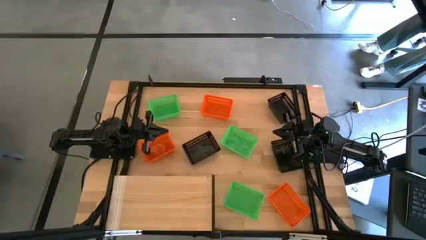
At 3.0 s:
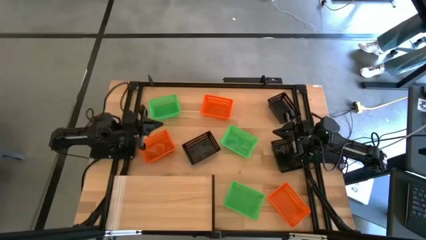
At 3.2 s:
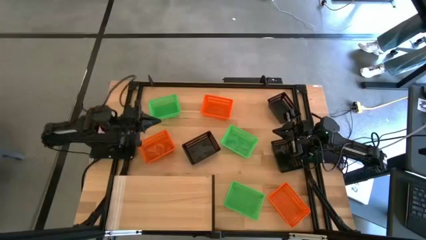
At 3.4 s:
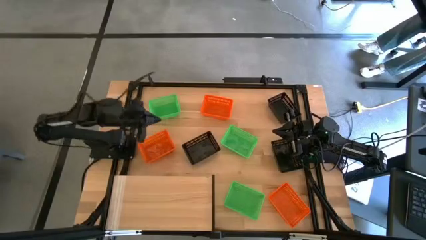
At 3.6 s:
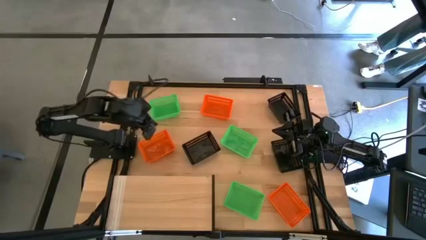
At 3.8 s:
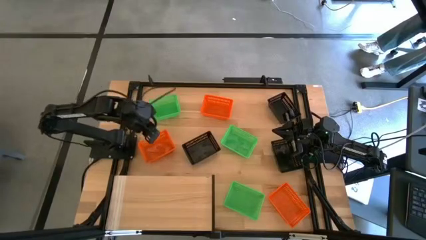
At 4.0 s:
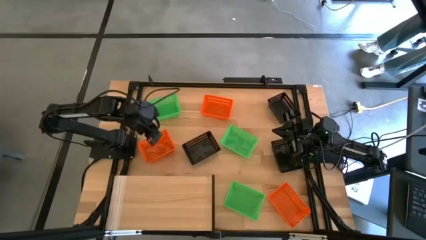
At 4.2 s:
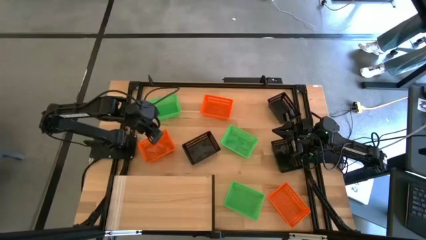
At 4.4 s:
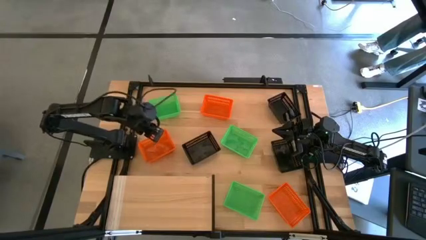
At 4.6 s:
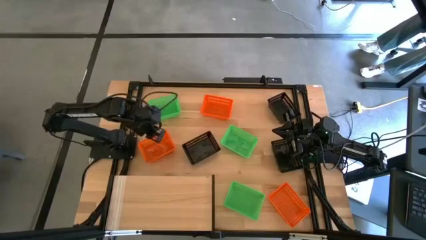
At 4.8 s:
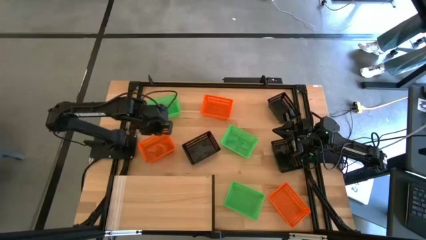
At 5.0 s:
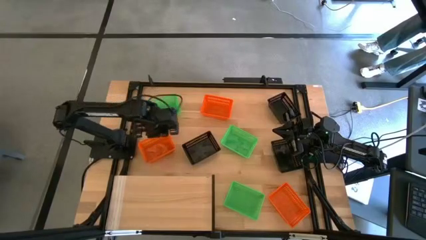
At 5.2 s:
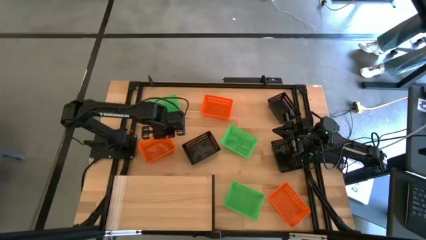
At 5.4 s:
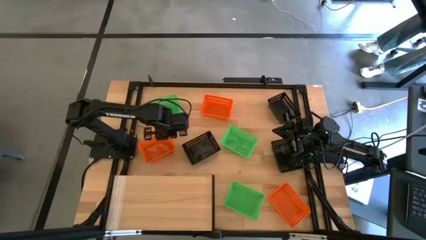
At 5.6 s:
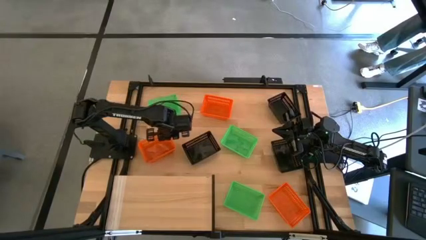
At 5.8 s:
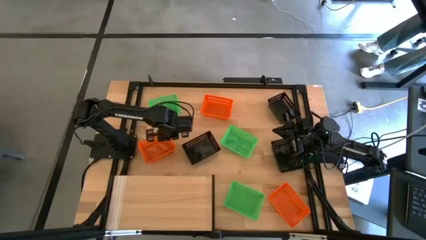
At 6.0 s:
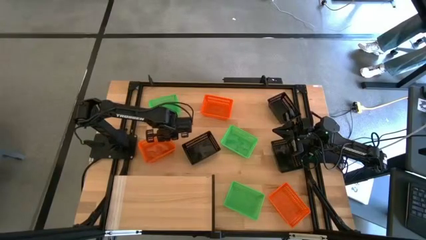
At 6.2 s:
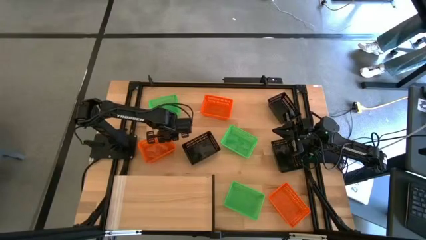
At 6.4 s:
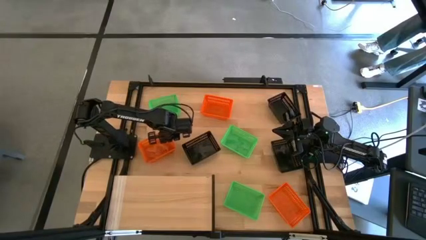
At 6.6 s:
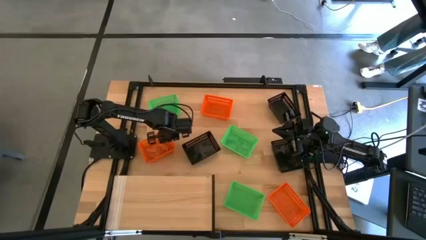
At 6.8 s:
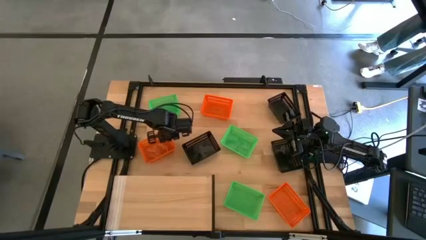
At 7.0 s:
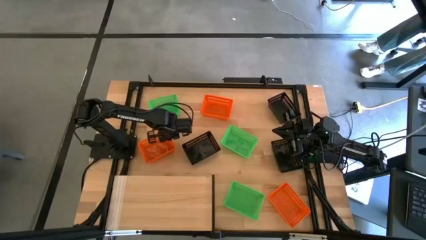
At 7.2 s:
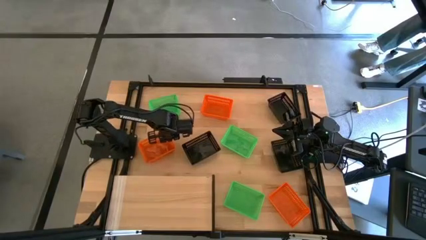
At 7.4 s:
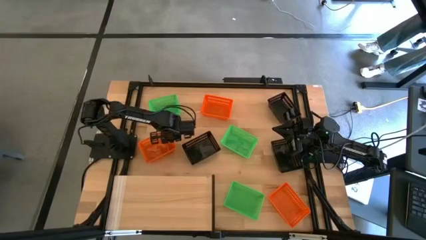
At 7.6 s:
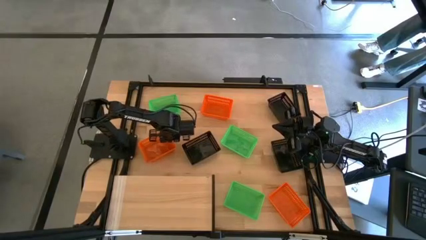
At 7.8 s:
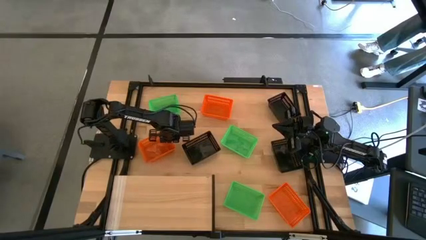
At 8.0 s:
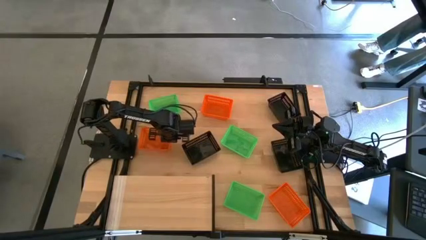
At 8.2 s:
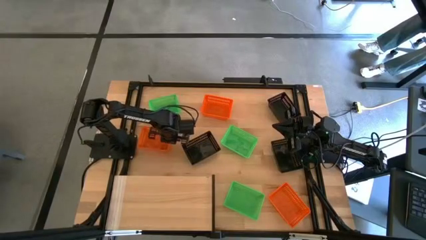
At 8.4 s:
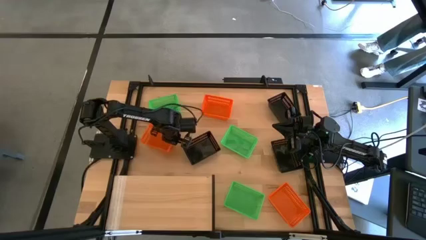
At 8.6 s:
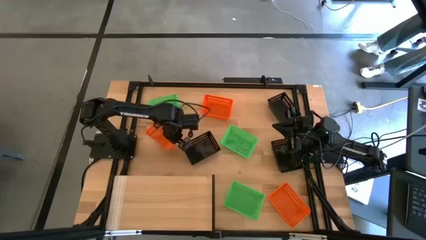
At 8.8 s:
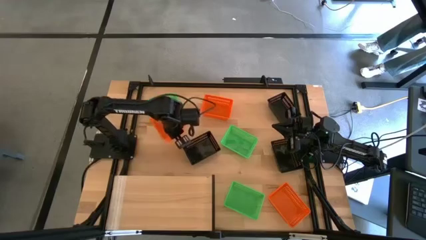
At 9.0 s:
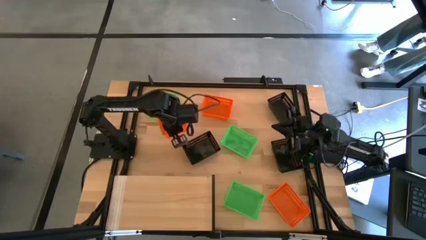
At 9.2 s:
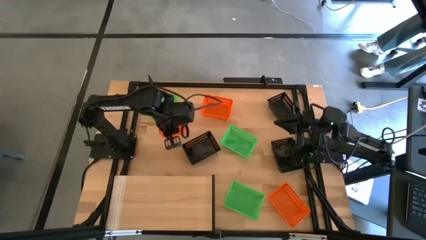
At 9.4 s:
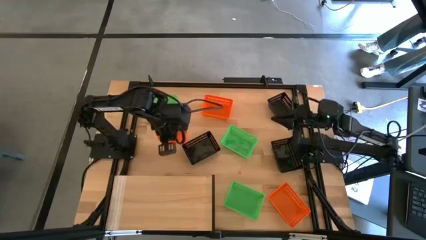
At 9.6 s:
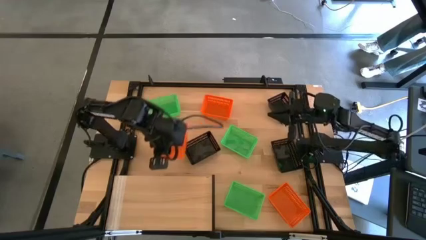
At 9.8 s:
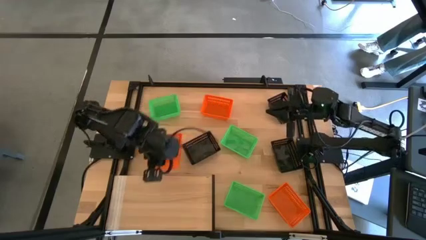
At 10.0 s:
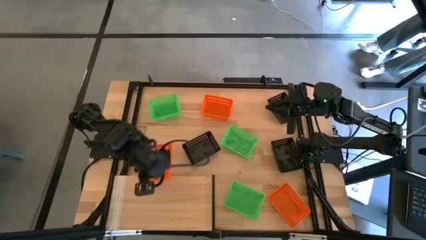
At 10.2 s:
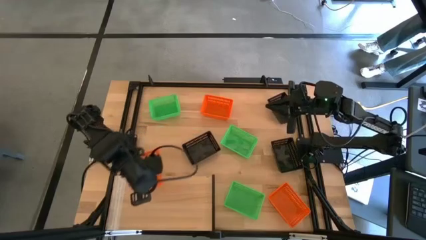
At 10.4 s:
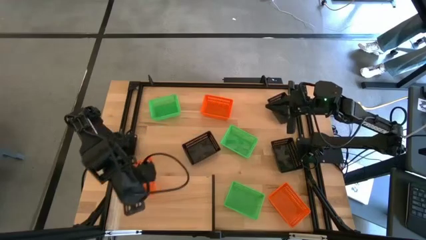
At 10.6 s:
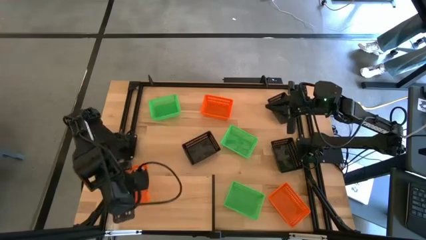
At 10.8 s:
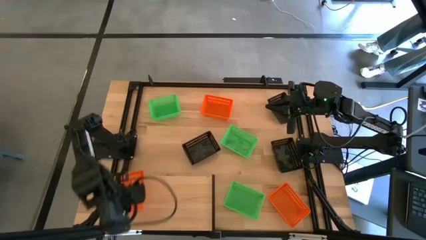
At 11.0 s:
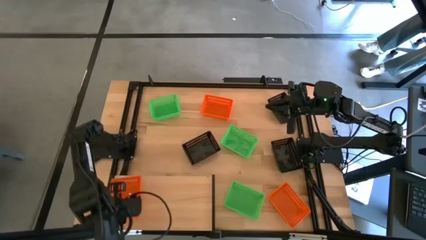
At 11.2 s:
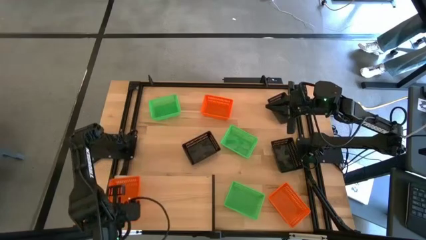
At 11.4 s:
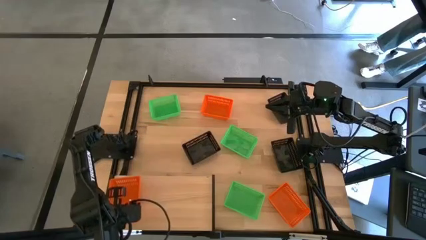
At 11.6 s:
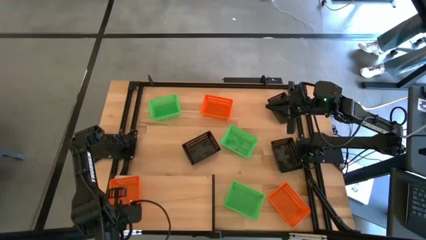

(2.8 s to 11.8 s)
Task: Stack baskets on shelf by color
Put the middle orange basket on the shelf

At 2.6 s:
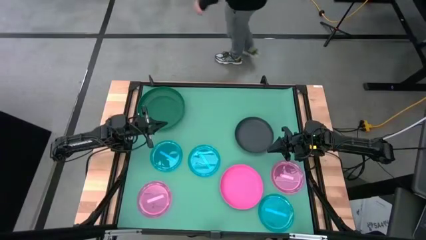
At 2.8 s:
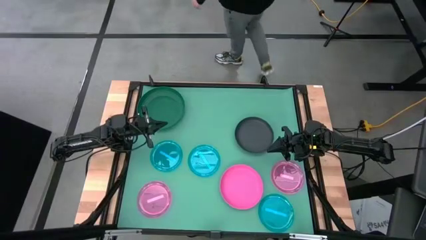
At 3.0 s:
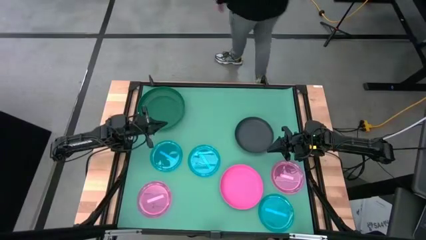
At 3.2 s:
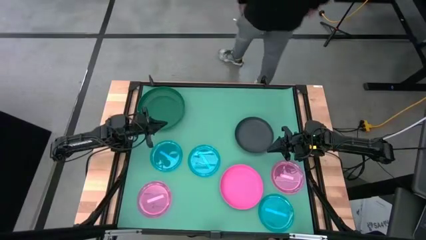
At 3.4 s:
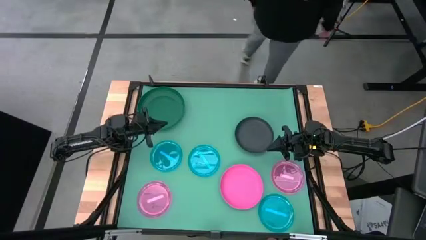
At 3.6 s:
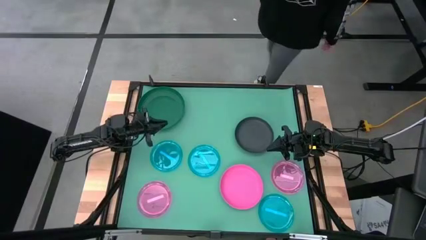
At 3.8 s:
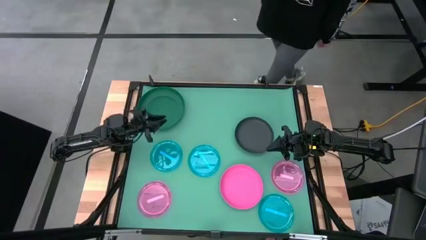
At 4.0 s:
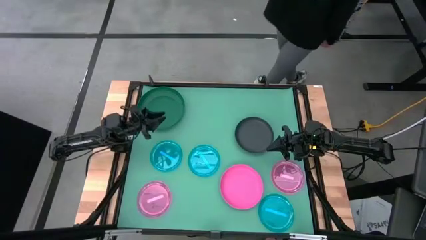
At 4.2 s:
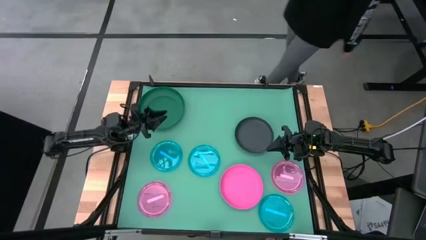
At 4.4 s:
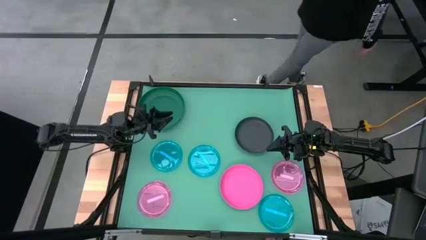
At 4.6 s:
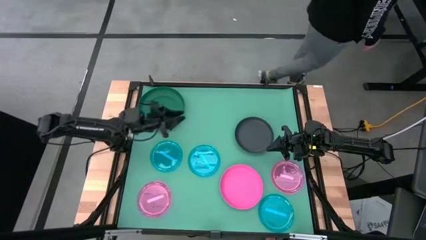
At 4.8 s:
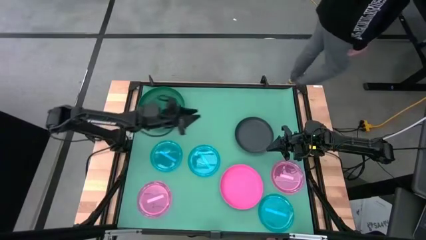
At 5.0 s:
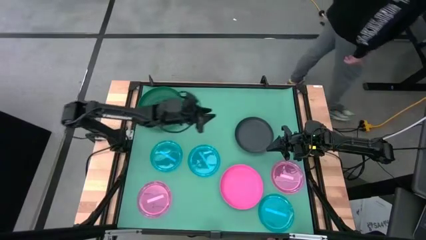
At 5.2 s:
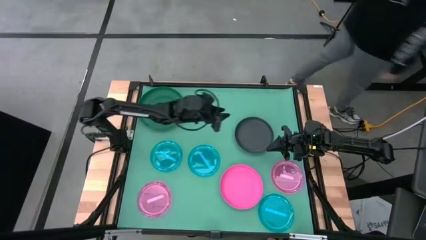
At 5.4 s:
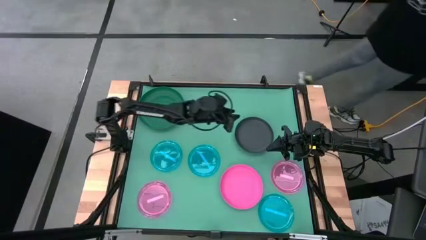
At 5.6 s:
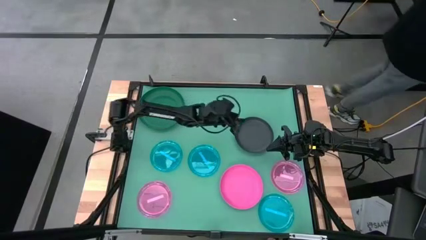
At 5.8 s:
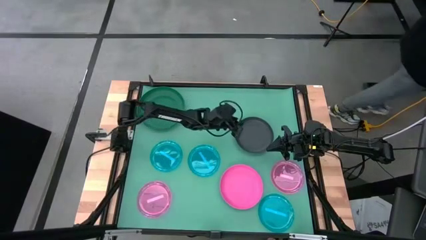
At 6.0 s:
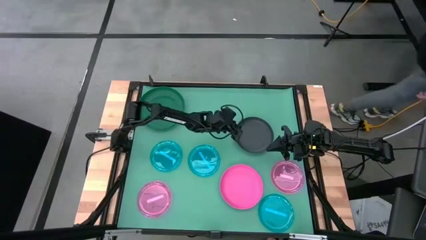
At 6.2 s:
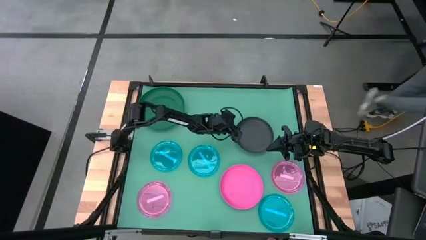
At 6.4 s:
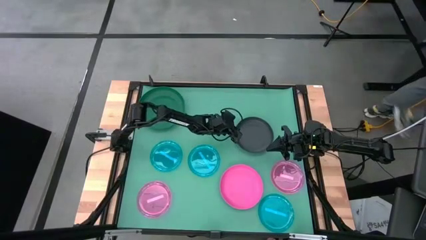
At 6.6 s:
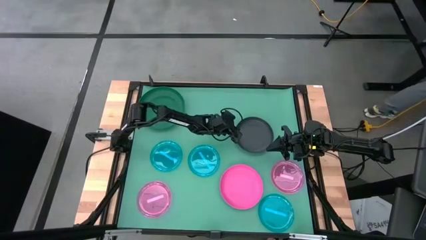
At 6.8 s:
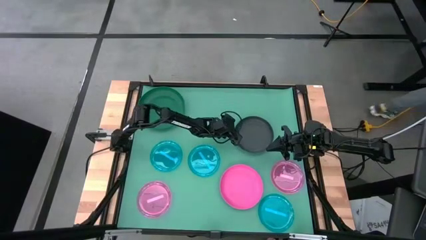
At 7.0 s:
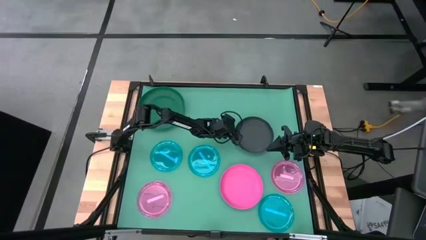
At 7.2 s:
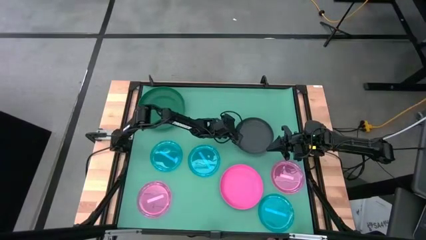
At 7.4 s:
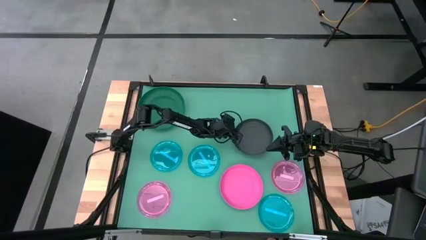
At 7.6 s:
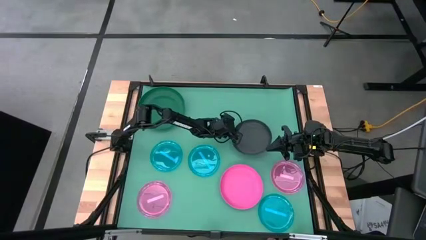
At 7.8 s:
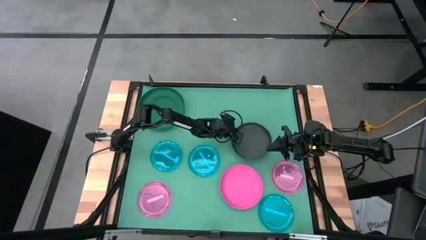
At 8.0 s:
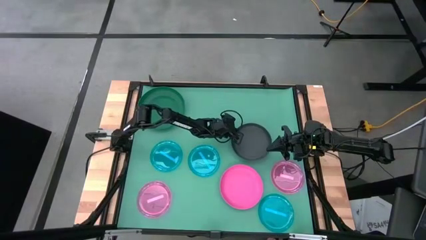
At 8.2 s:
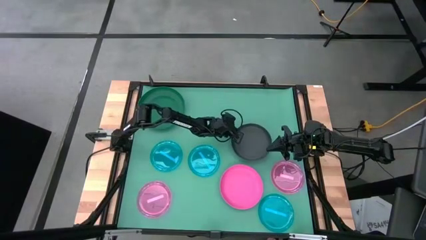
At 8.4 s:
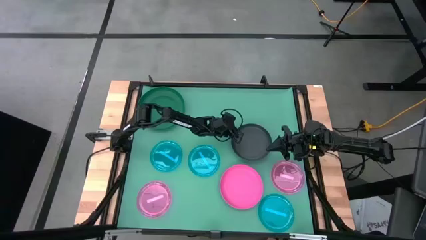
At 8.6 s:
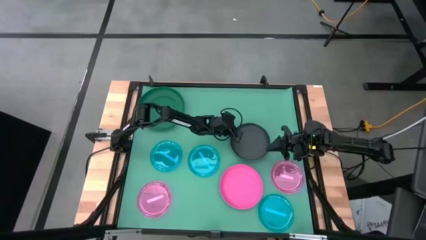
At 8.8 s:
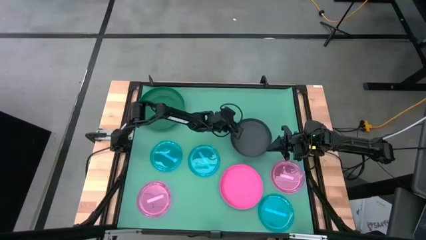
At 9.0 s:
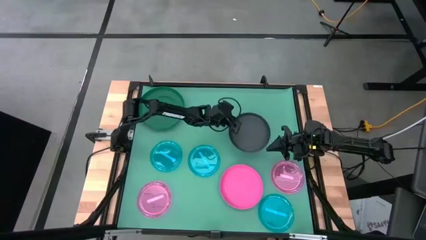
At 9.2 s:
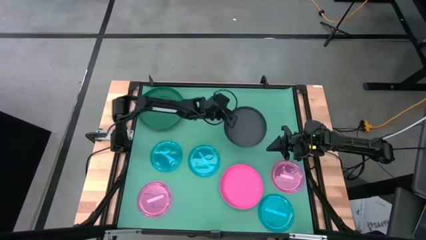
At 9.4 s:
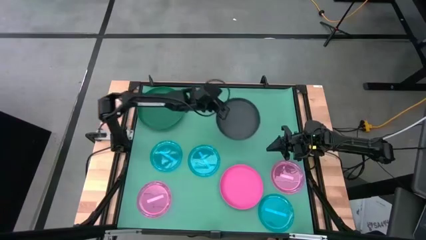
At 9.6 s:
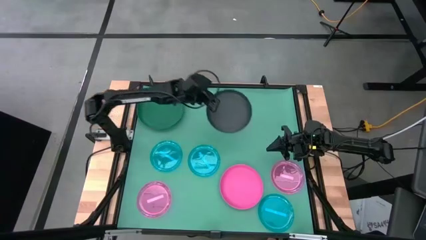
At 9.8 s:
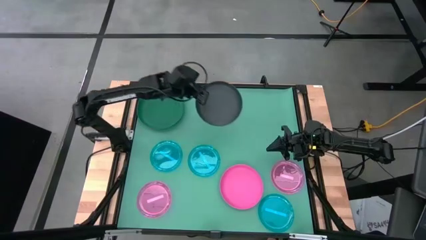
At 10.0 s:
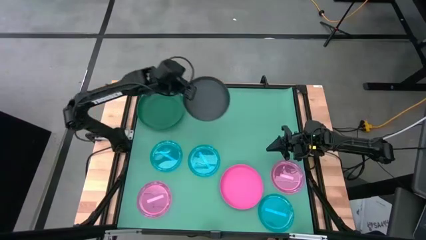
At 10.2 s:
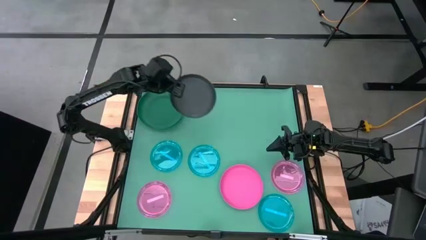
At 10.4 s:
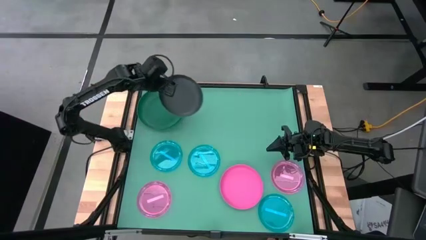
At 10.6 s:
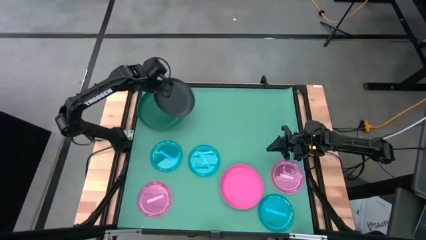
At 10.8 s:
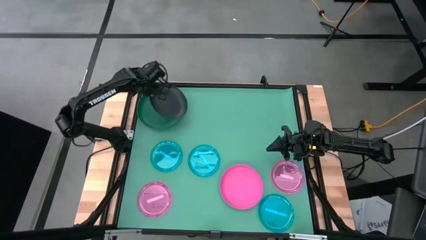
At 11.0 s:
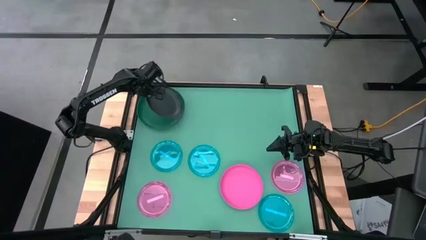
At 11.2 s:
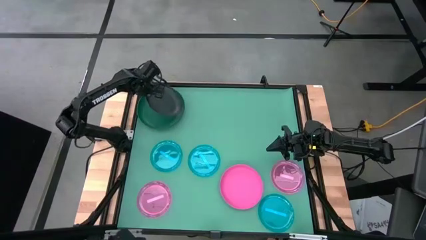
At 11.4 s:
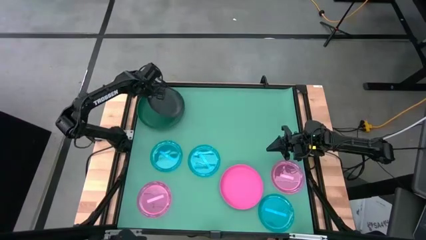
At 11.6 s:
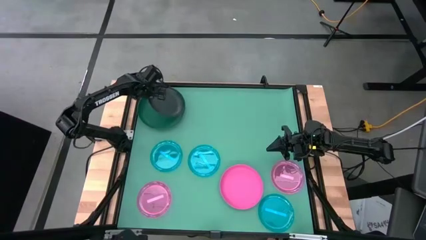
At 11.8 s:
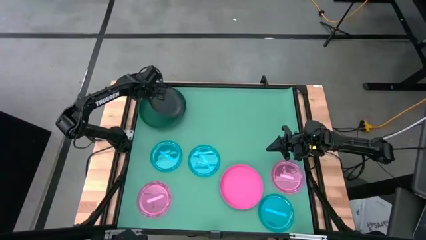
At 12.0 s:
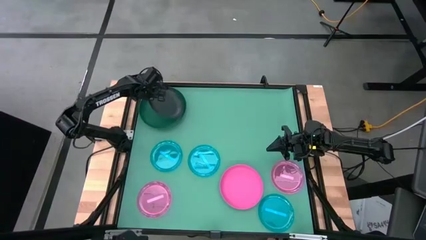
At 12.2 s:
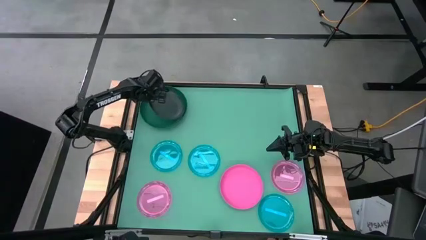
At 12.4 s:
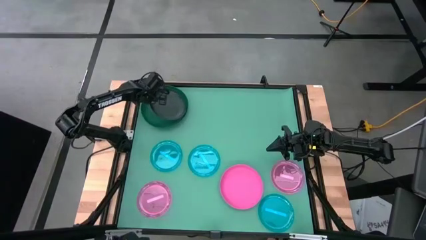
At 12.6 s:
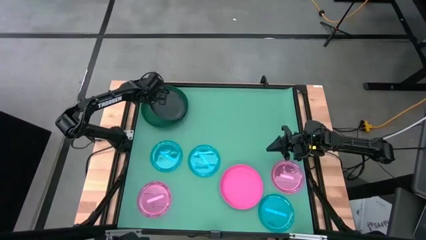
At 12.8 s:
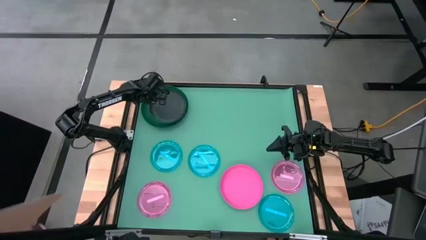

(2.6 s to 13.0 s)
Task: Stack plastic plates
Stack the black plate on top of the green plate
